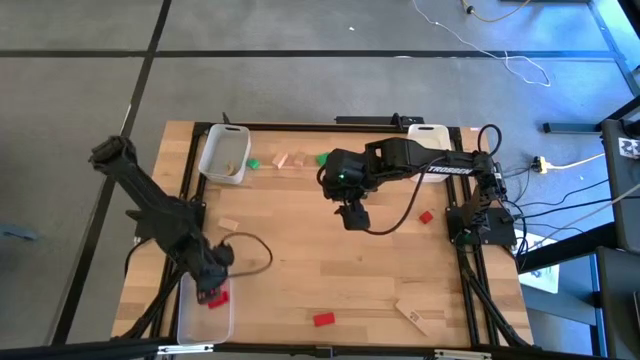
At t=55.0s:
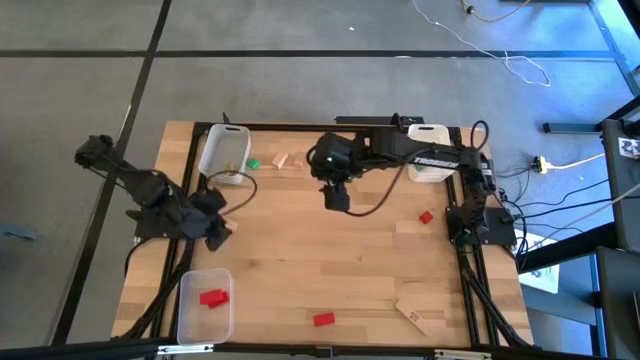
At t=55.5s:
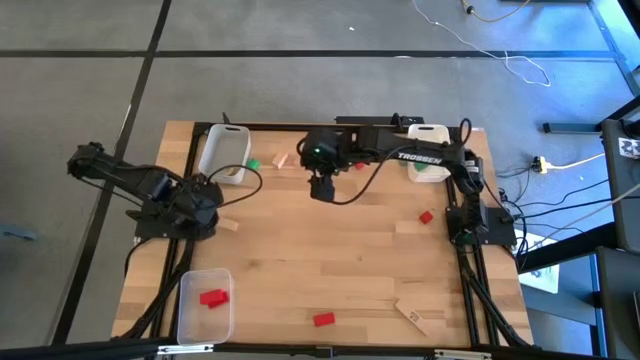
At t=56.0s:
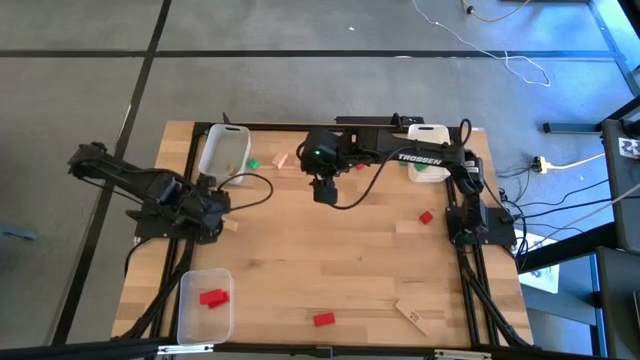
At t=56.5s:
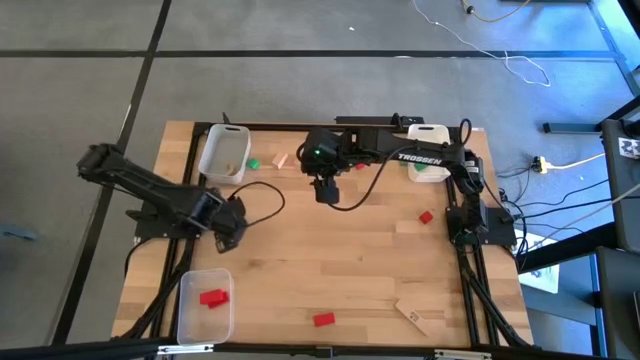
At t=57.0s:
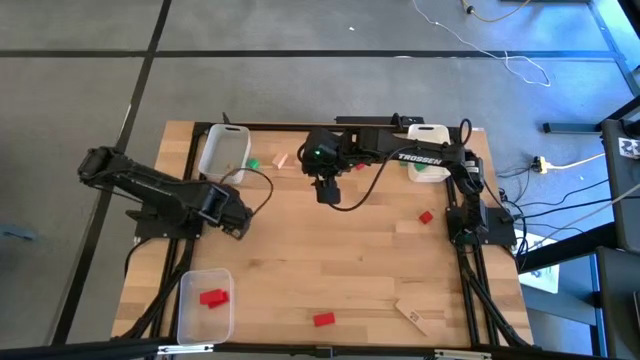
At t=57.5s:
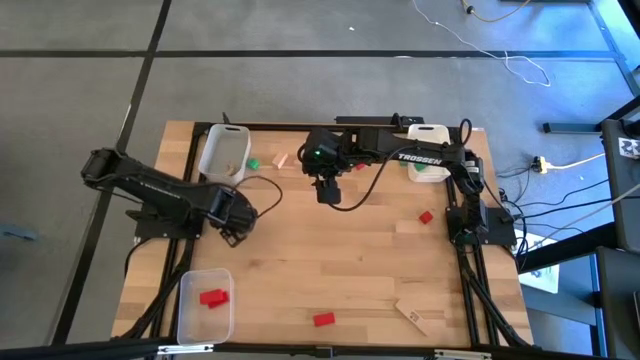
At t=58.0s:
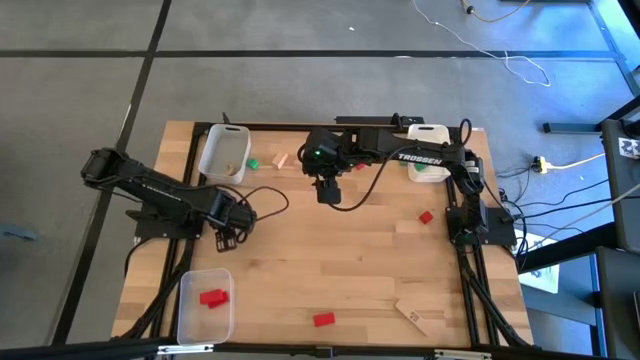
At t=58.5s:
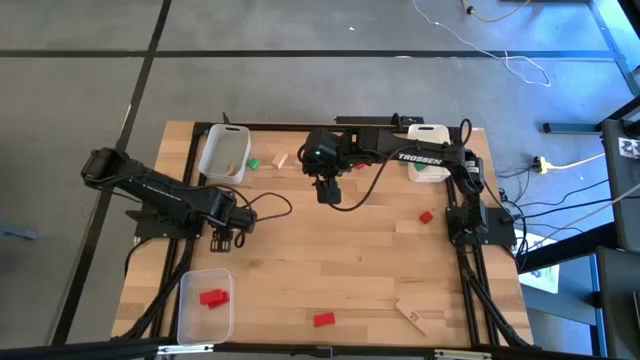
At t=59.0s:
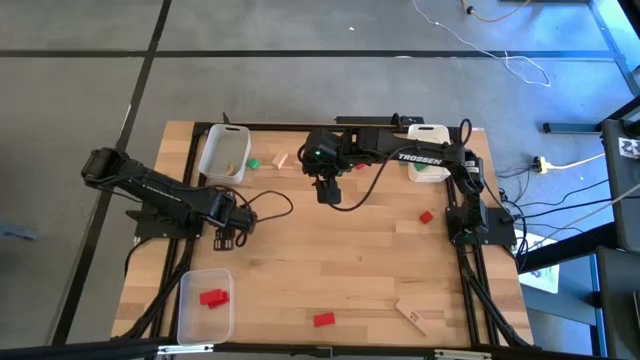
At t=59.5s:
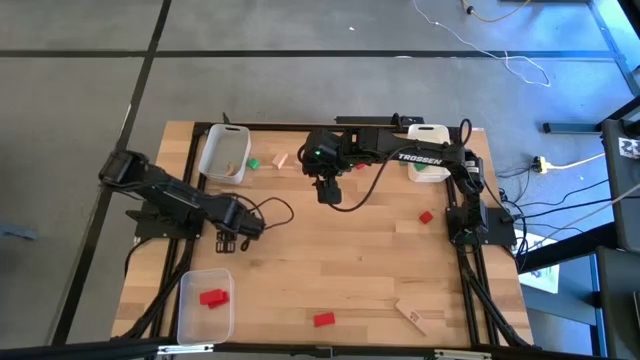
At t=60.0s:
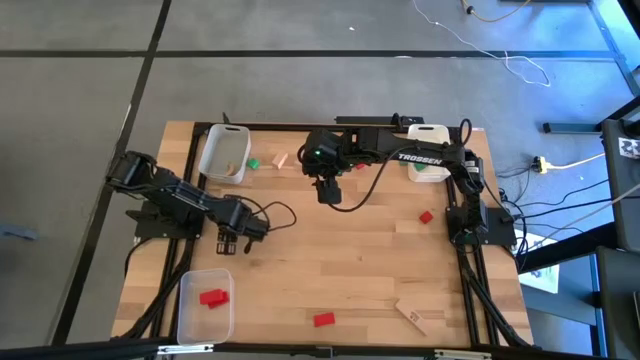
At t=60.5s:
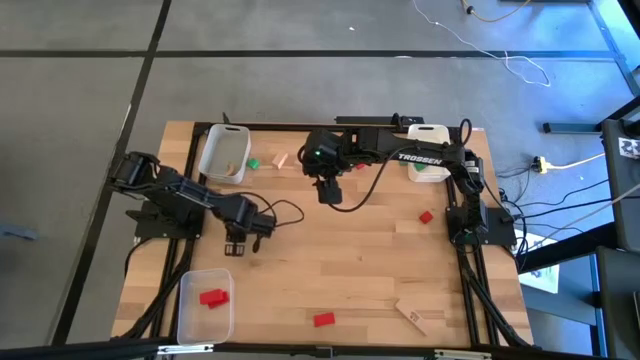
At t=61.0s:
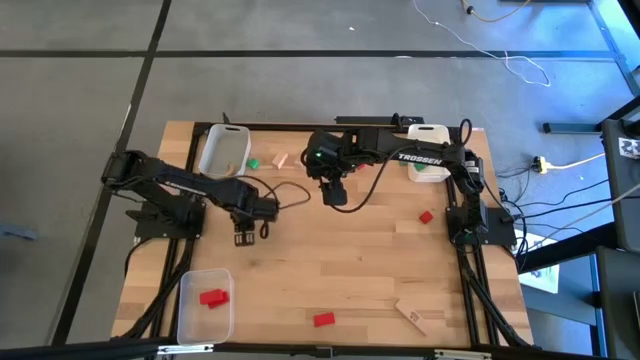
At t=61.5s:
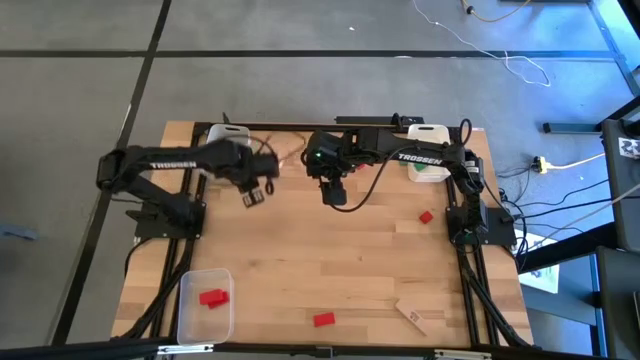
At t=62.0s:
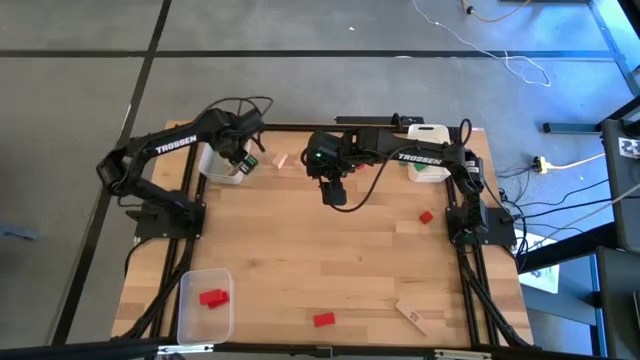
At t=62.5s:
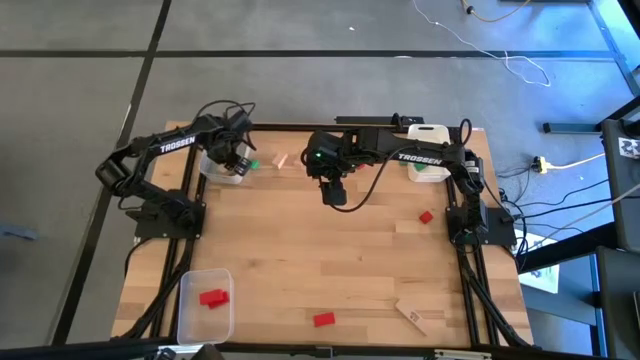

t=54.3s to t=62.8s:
Task: Sort & place blocks by color
Put the brown block into the gray bin

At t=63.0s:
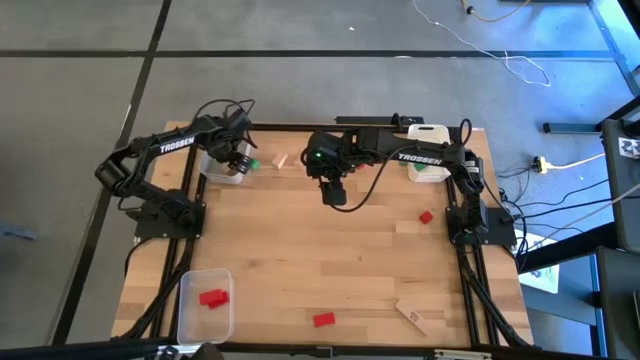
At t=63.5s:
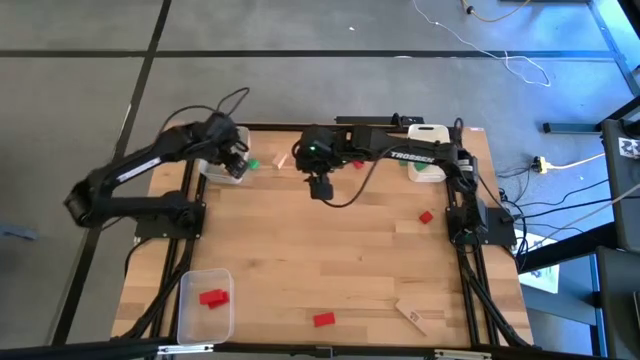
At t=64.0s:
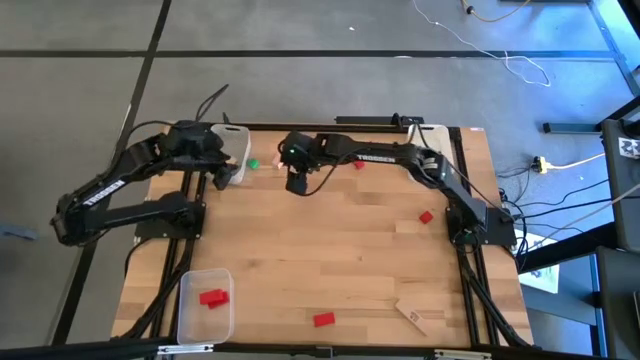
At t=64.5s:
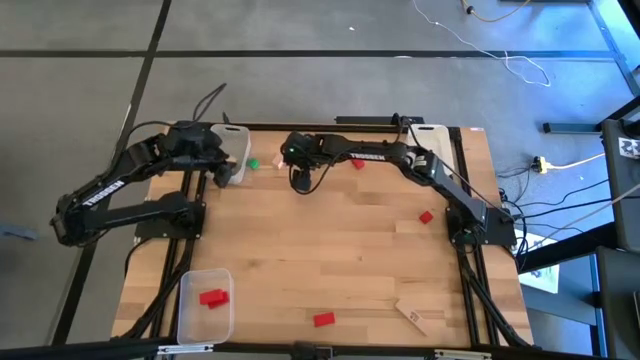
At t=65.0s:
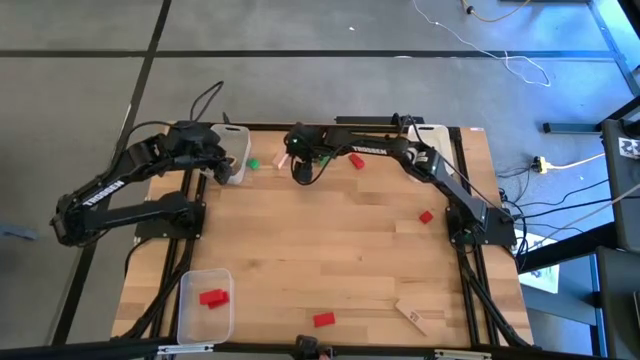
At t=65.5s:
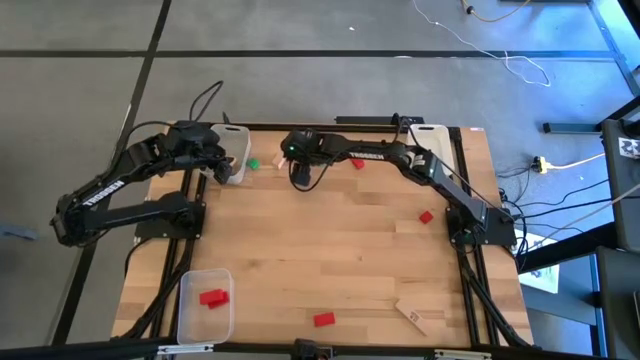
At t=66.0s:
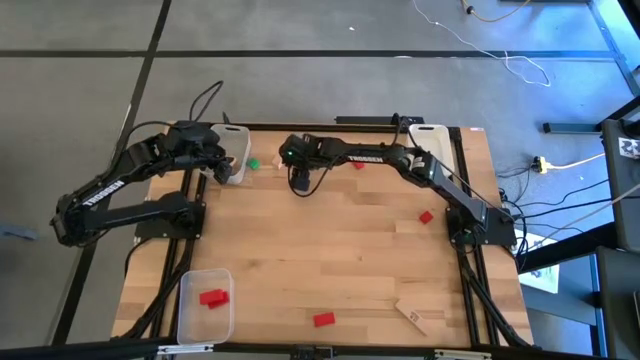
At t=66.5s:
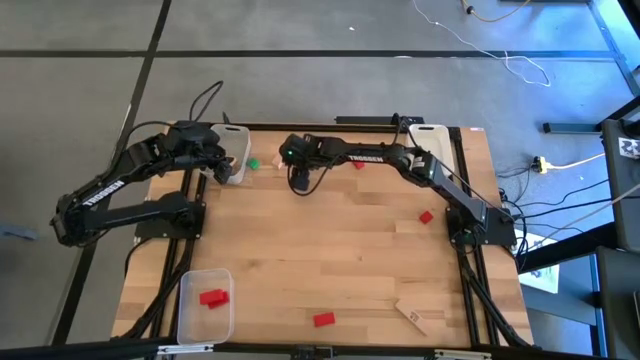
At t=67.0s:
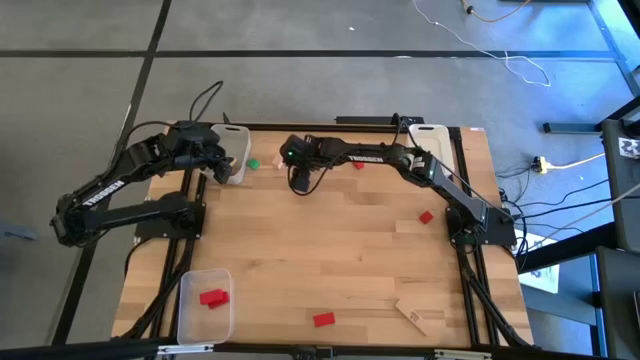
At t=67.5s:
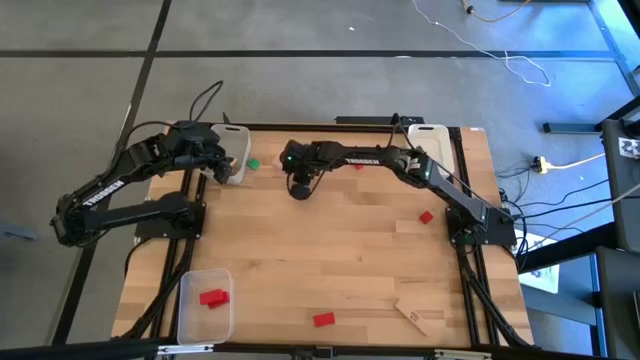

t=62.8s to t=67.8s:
Put the brown block into the gray bin

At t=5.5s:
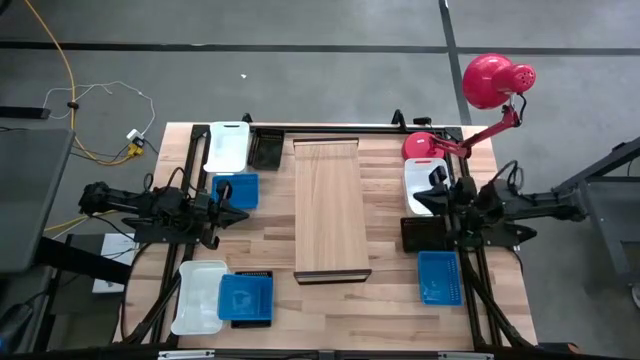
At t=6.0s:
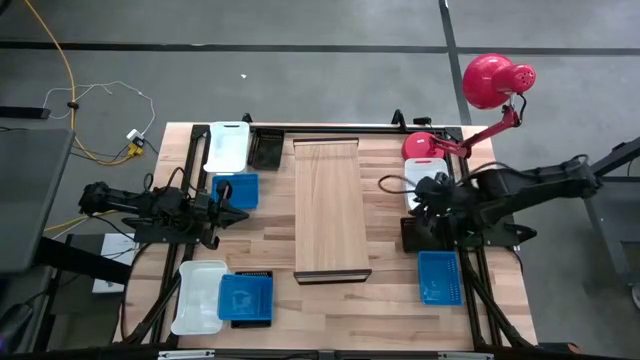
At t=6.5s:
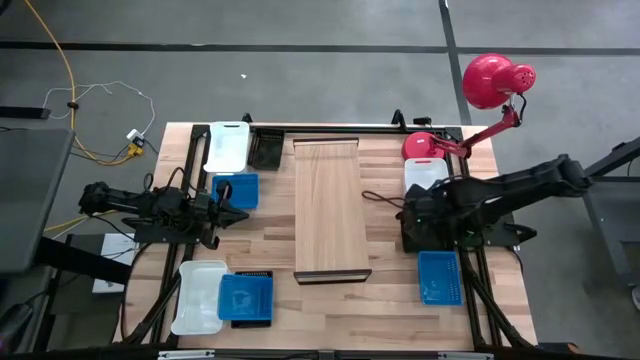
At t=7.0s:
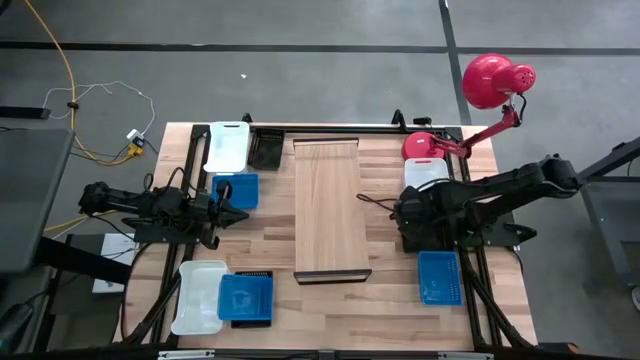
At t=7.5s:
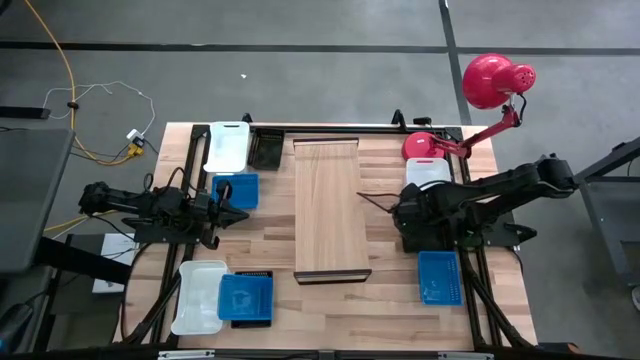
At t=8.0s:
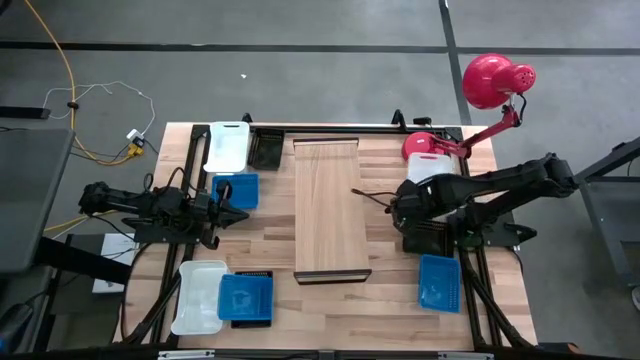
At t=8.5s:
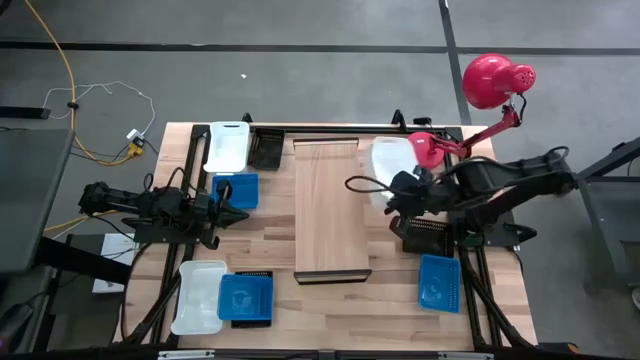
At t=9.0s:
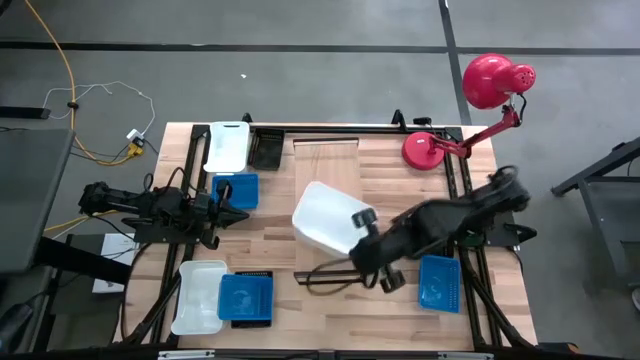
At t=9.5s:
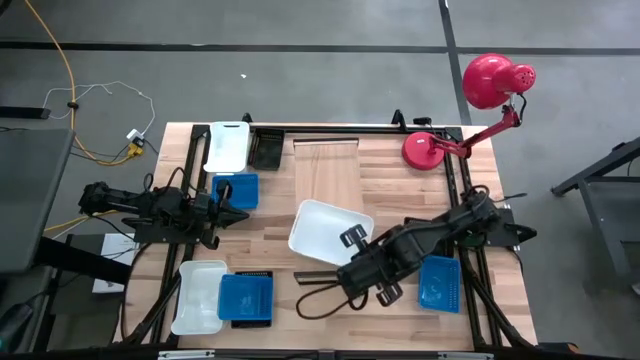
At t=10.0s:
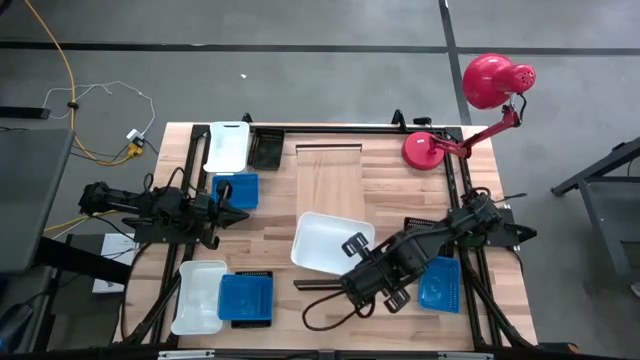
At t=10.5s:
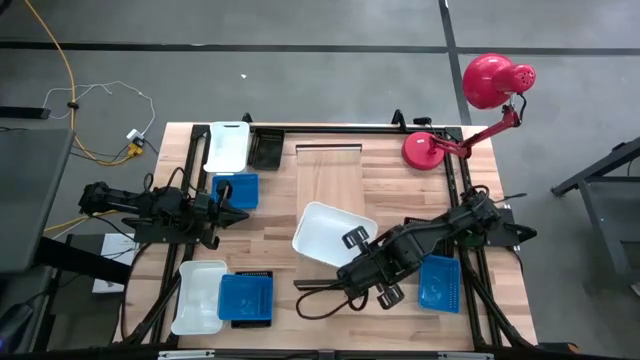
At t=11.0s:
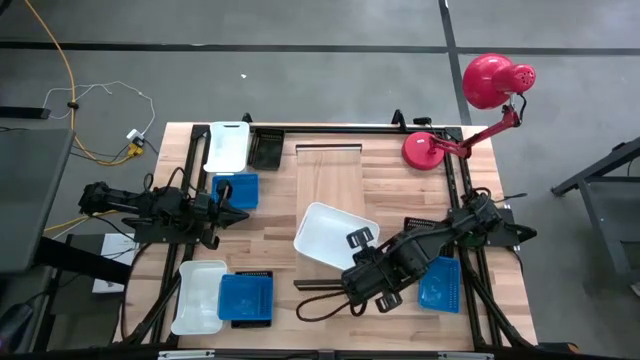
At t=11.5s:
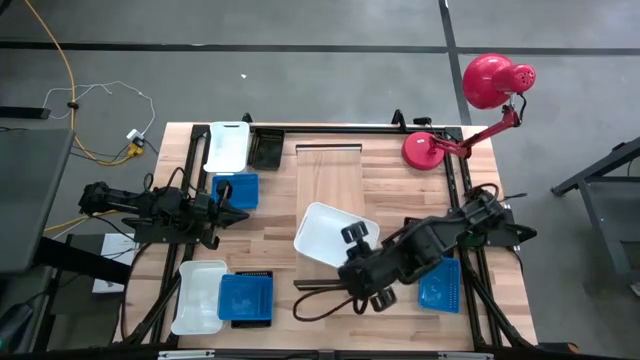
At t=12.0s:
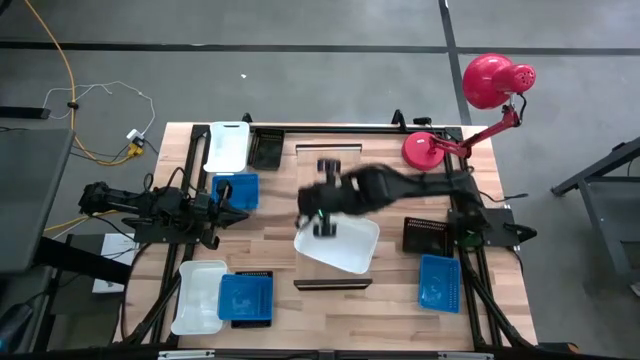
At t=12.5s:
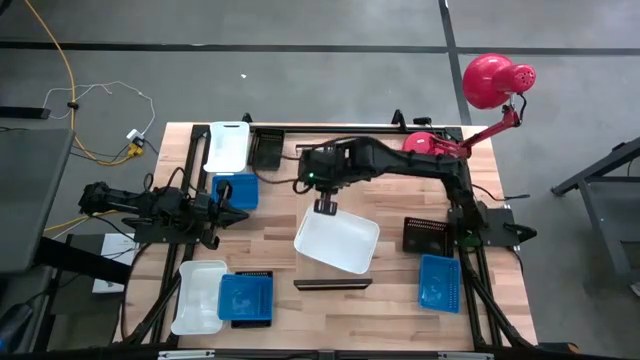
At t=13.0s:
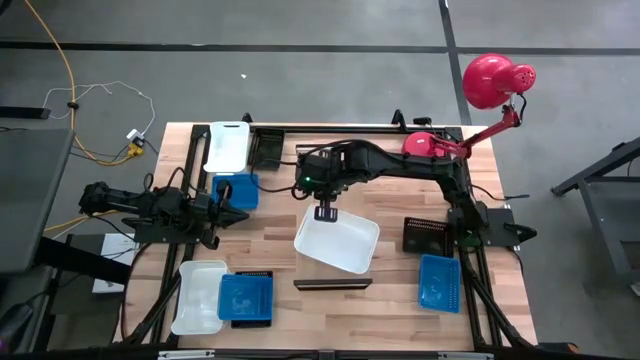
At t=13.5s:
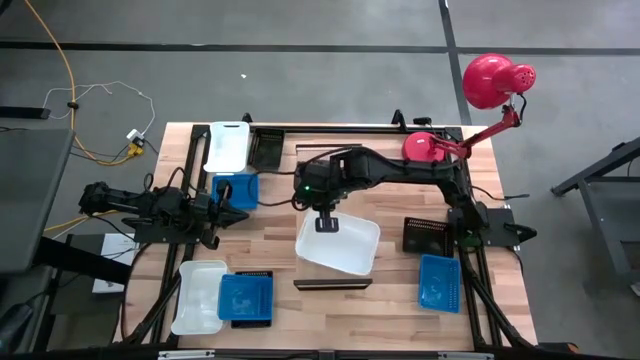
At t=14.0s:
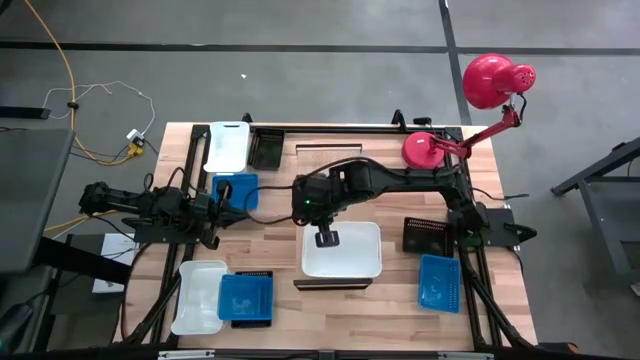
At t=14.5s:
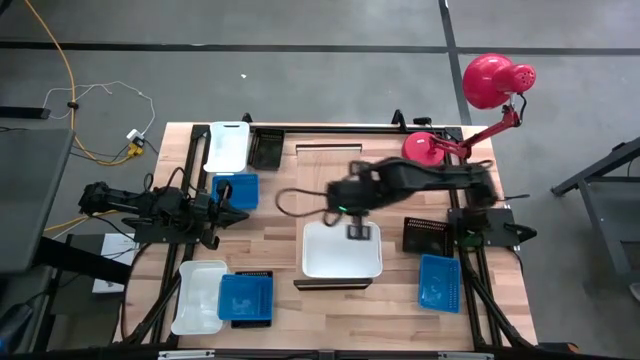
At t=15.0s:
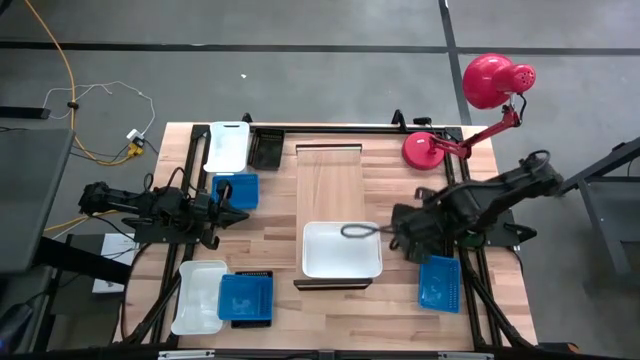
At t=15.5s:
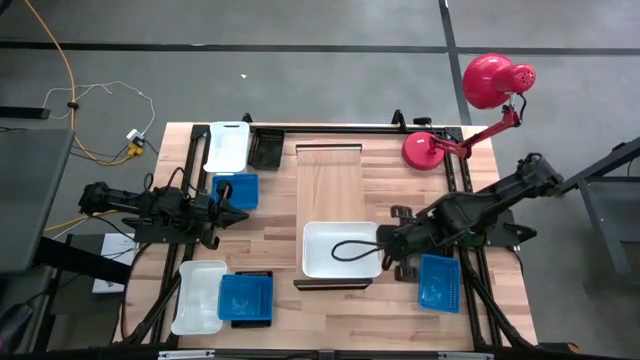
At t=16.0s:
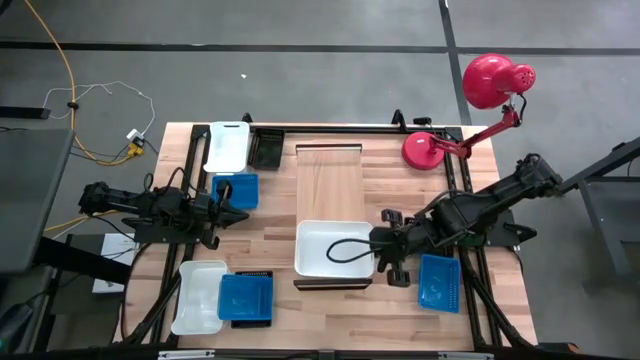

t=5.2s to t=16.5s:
Task: Stack baskets on shelf by color
Put the right white bin on the shelf
